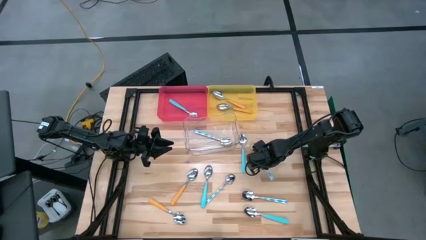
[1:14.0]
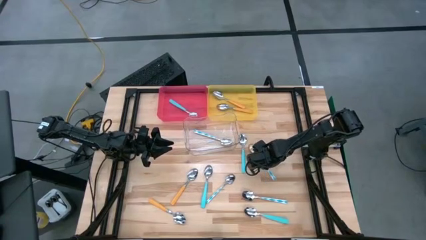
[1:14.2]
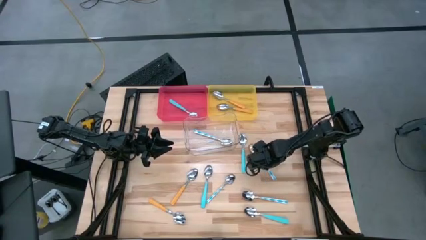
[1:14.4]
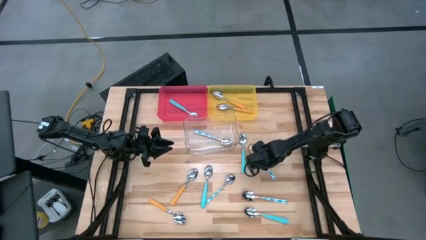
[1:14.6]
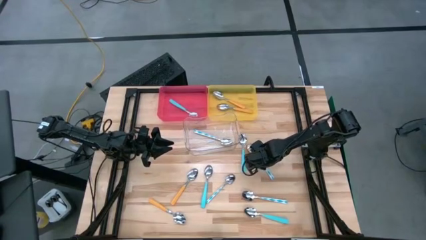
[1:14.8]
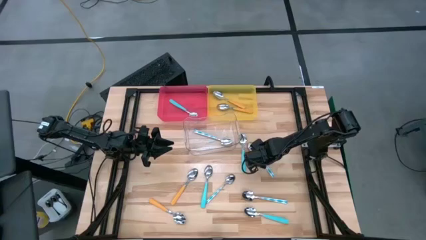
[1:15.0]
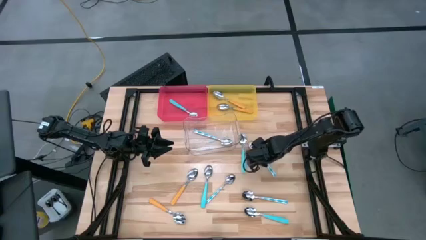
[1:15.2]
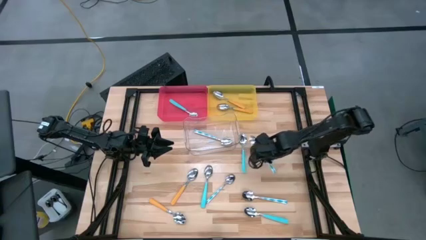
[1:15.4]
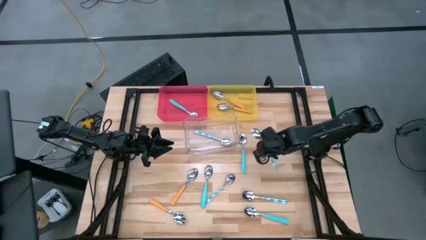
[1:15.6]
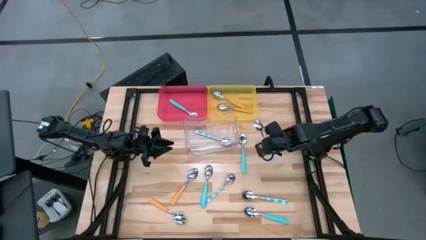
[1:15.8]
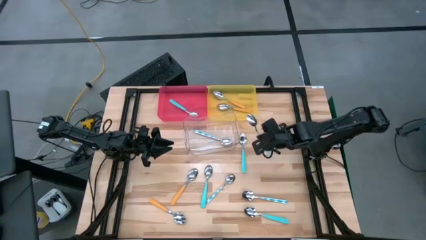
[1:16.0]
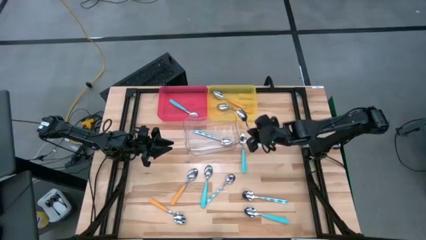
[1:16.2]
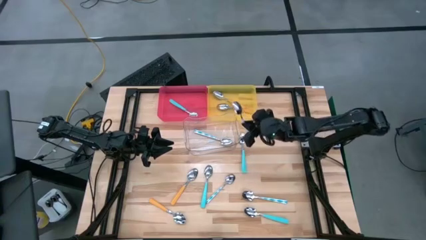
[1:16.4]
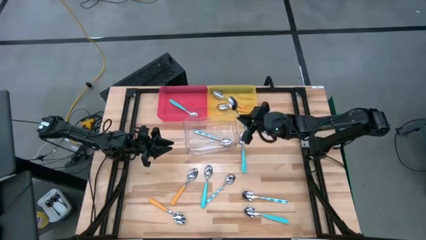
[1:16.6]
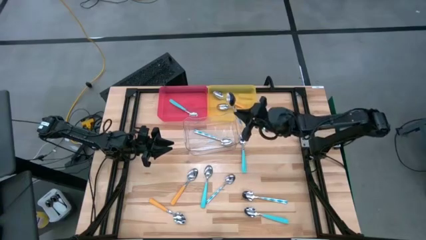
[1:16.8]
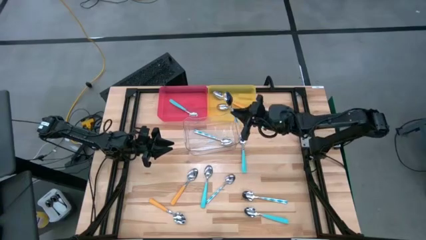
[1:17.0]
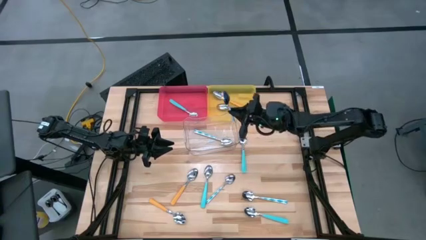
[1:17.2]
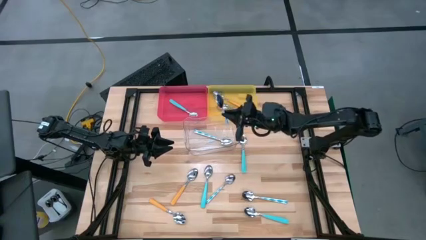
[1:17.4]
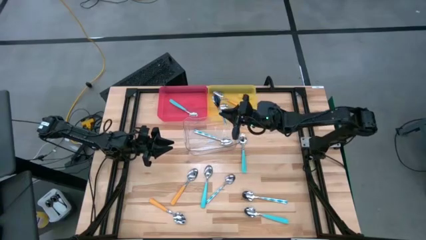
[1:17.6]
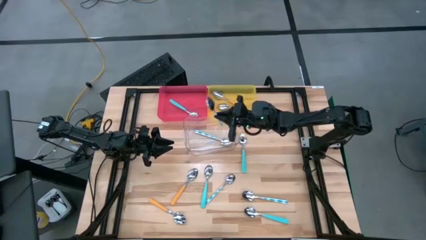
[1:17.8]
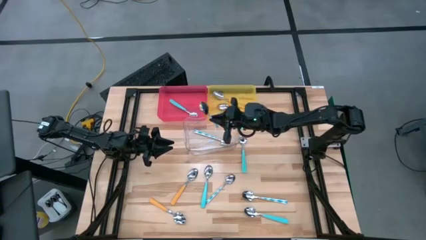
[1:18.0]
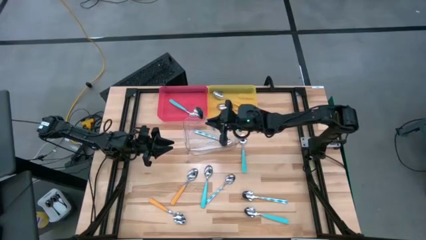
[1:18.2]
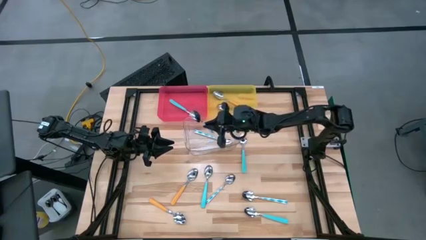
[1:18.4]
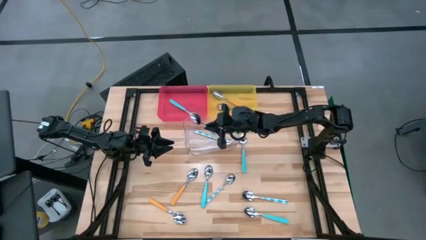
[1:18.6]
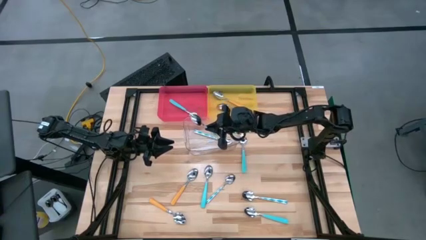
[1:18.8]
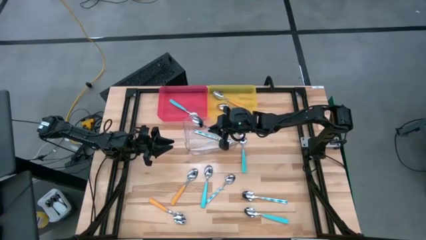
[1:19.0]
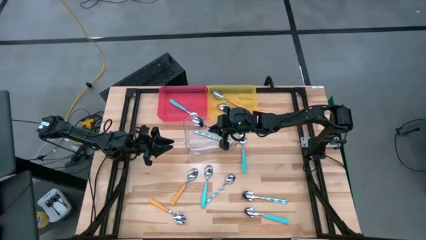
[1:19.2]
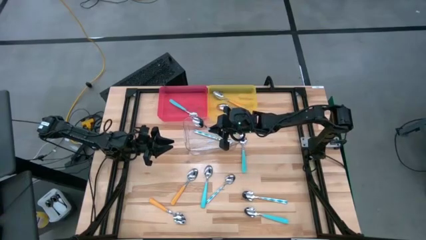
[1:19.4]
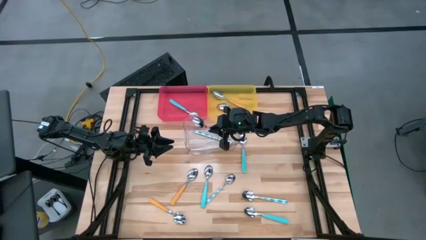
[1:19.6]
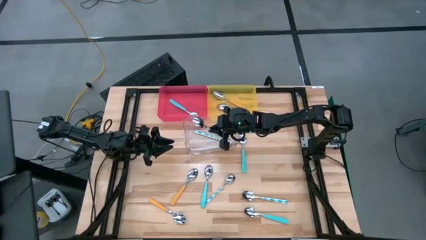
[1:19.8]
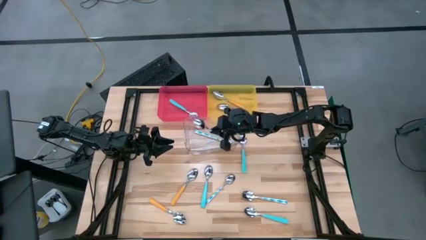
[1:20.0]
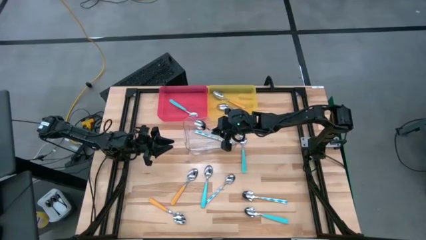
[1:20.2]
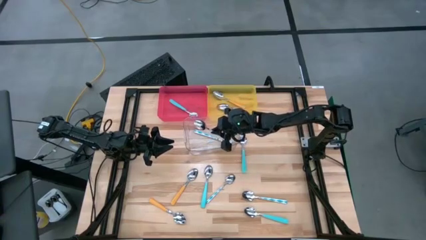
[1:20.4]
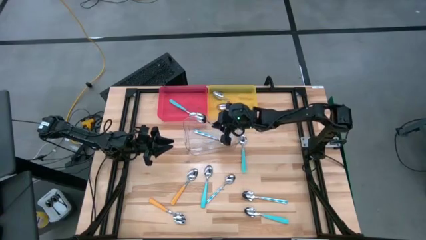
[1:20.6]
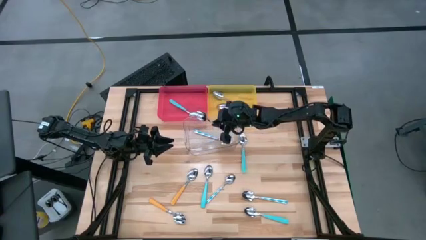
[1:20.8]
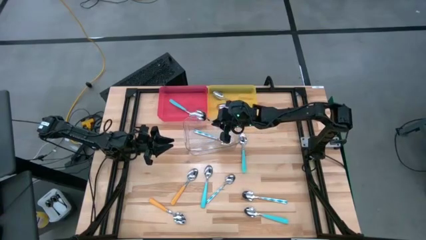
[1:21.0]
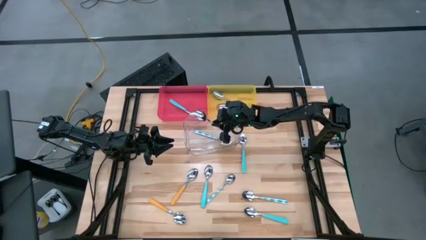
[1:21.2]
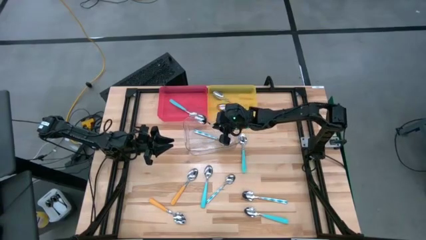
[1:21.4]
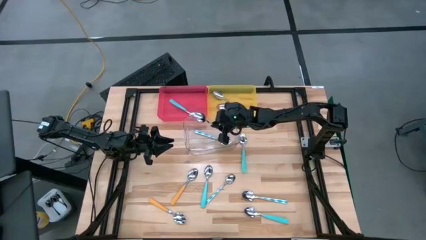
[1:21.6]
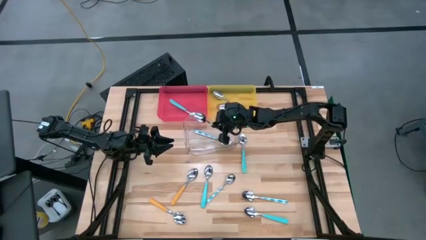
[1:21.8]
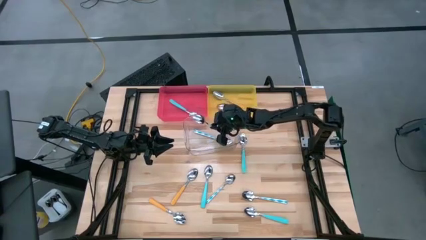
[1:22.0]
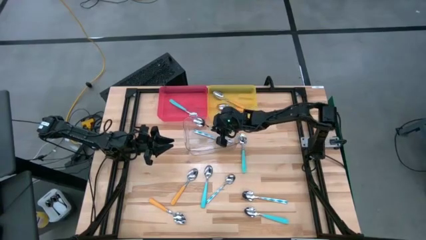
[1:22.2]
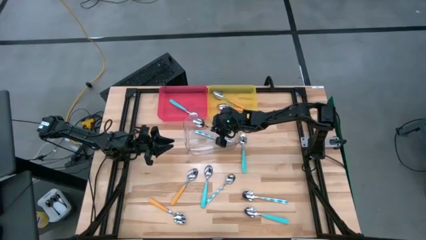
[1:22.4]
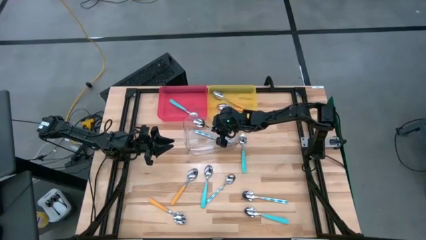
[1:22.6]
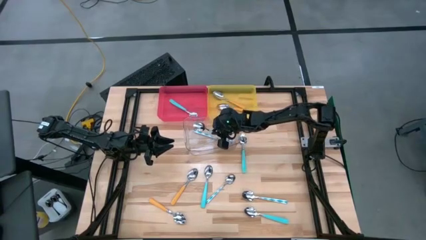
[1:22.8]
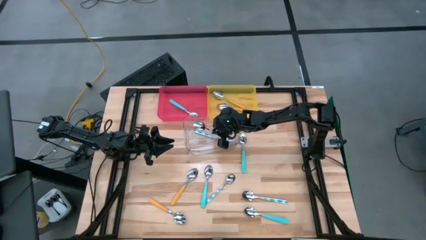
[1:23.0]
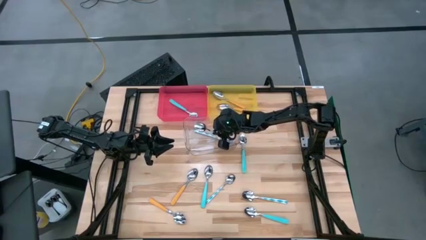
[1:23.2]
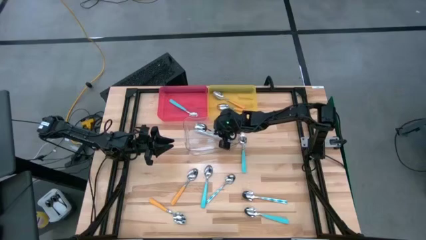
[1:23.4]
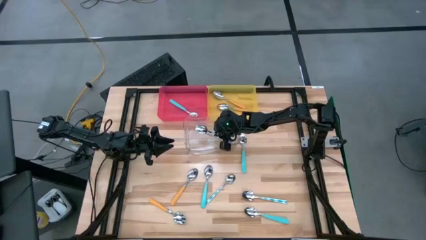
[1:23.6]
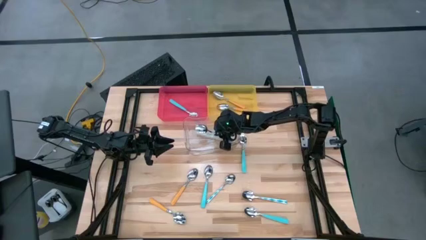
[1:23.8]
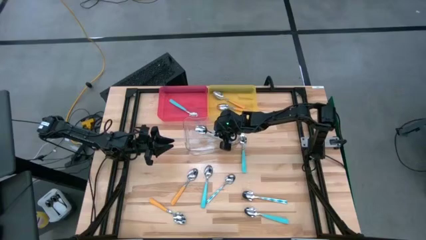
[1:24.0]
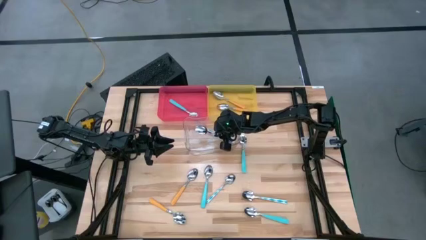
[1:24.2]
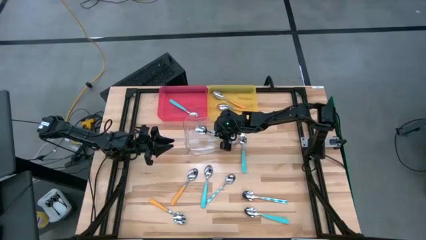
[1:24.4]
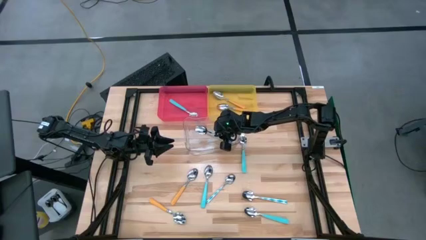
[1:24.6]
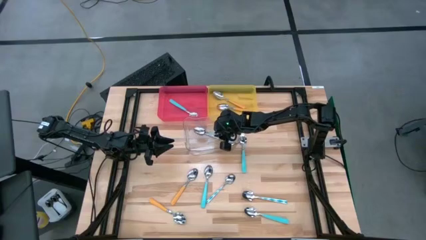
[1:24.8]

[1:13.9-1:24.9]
Task: Sort silverware by color (type)
Put the green patterned spoon into the transparent bin
